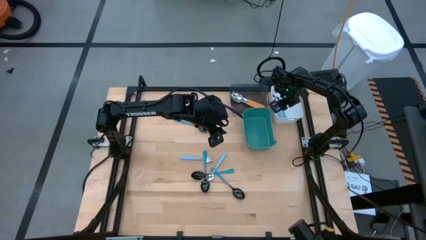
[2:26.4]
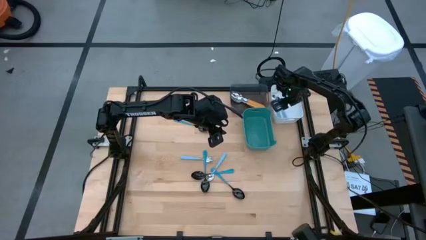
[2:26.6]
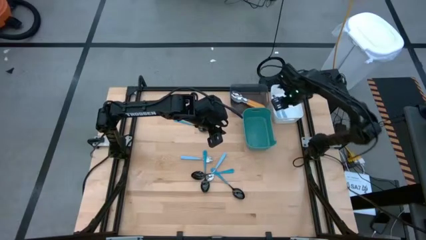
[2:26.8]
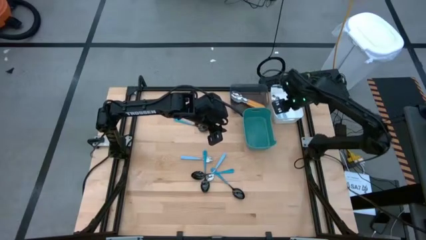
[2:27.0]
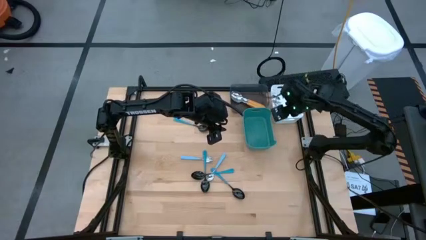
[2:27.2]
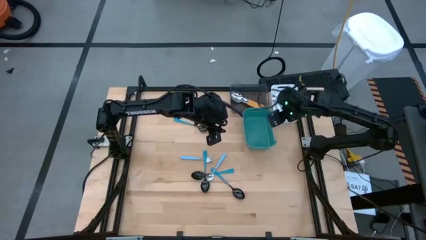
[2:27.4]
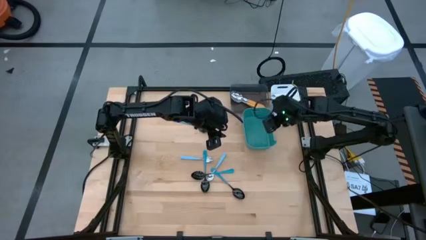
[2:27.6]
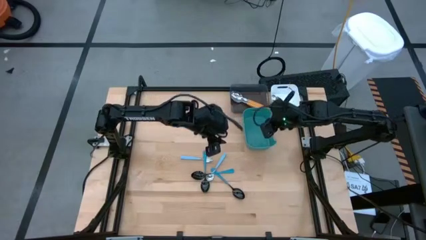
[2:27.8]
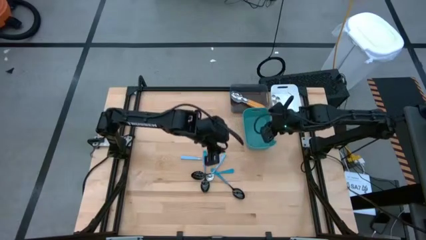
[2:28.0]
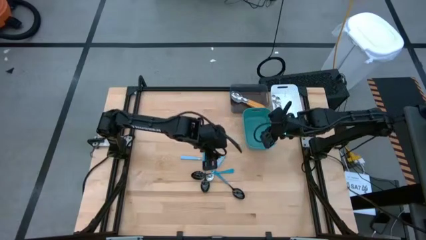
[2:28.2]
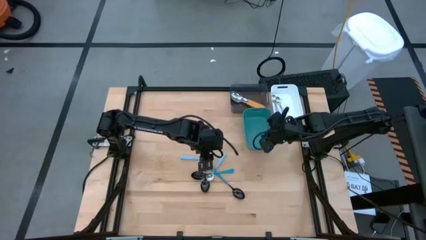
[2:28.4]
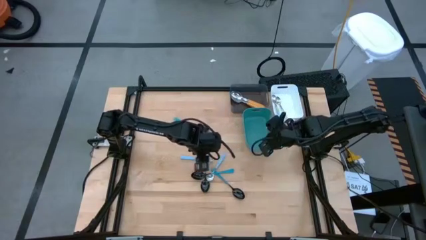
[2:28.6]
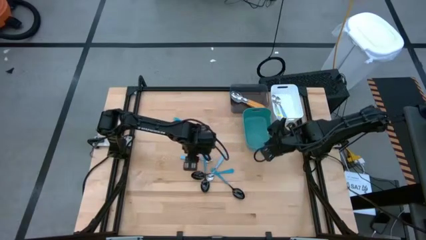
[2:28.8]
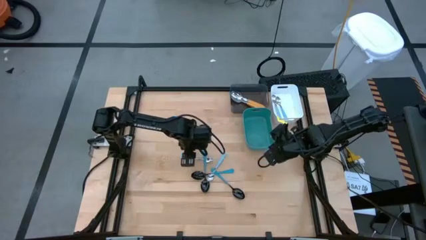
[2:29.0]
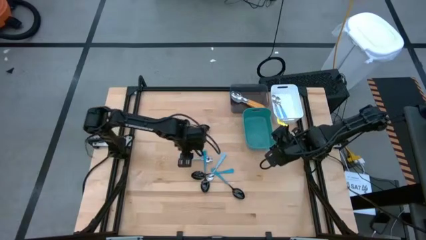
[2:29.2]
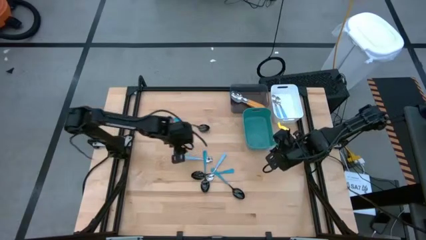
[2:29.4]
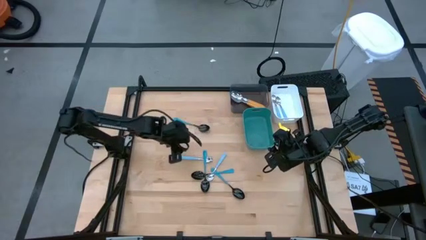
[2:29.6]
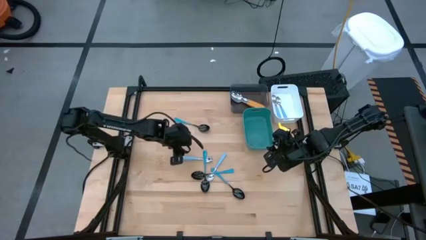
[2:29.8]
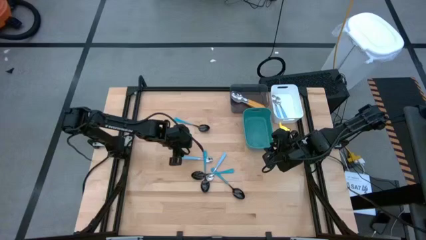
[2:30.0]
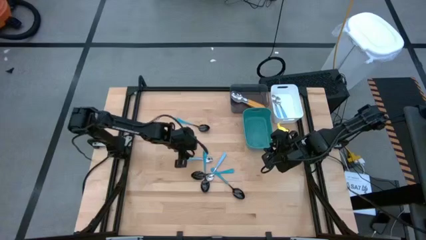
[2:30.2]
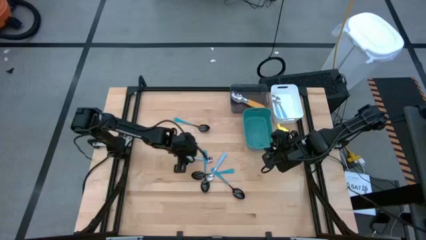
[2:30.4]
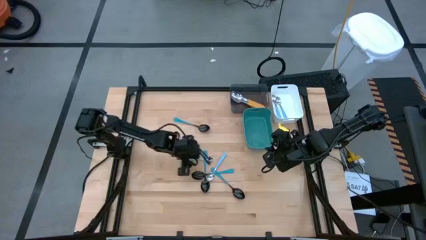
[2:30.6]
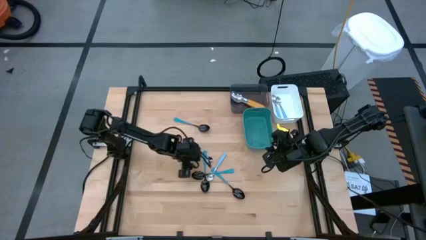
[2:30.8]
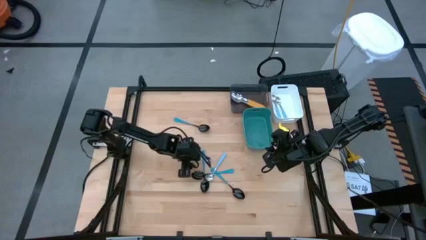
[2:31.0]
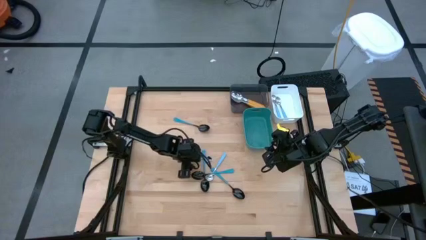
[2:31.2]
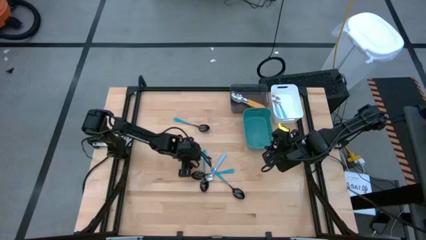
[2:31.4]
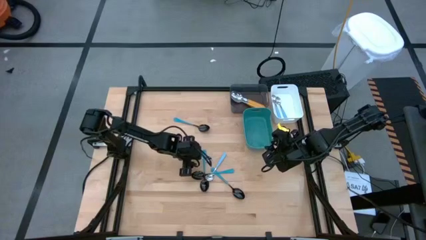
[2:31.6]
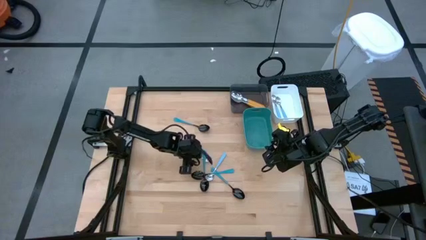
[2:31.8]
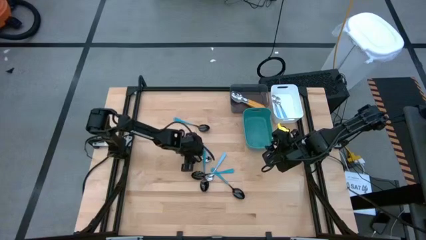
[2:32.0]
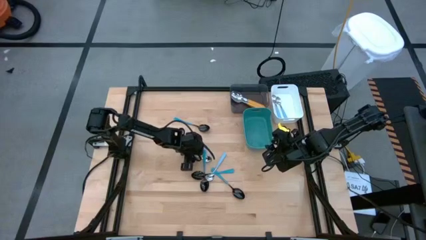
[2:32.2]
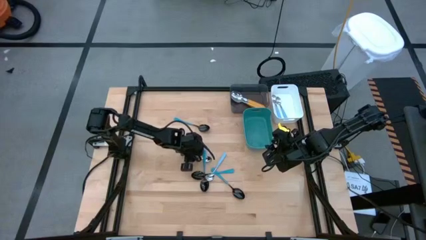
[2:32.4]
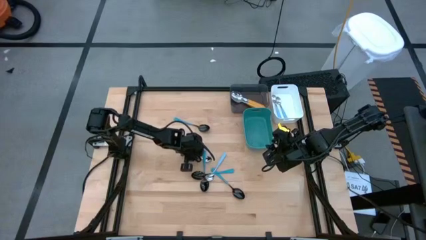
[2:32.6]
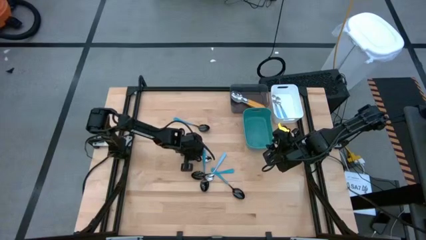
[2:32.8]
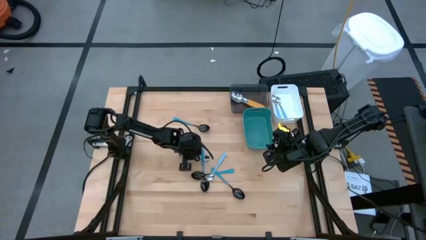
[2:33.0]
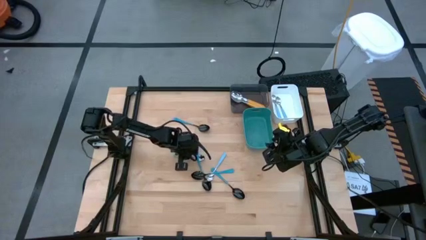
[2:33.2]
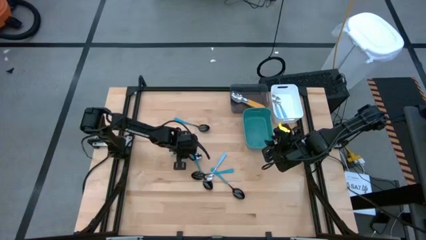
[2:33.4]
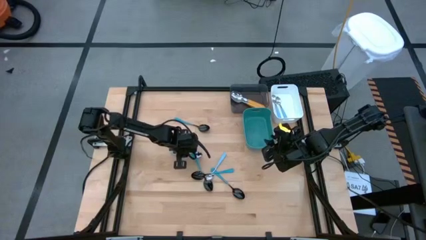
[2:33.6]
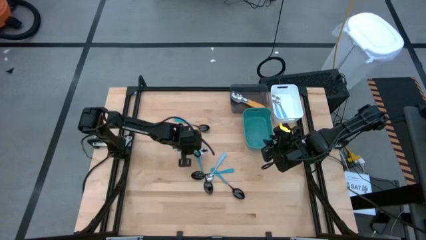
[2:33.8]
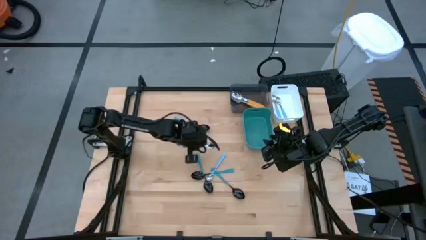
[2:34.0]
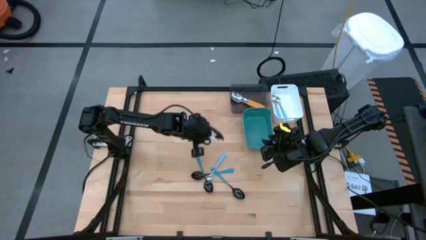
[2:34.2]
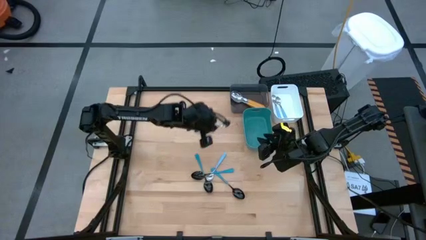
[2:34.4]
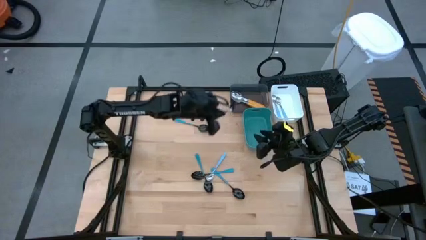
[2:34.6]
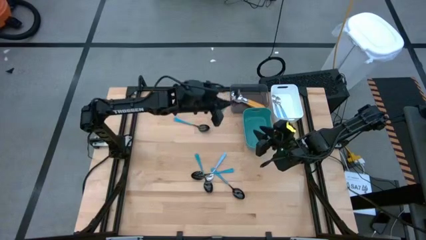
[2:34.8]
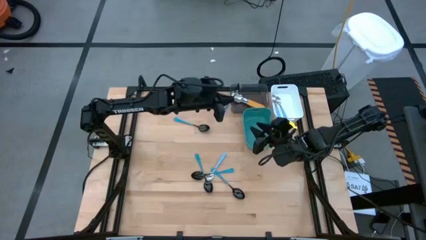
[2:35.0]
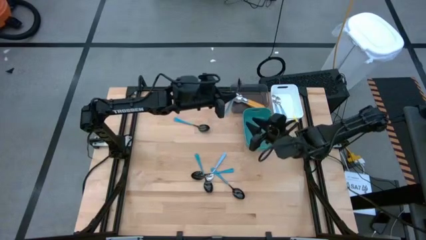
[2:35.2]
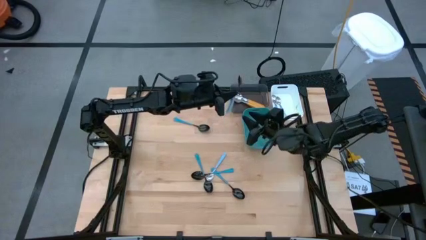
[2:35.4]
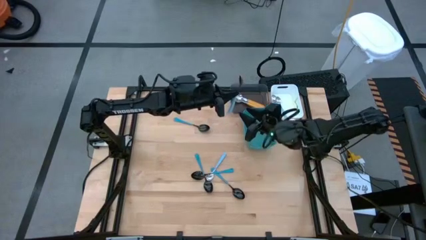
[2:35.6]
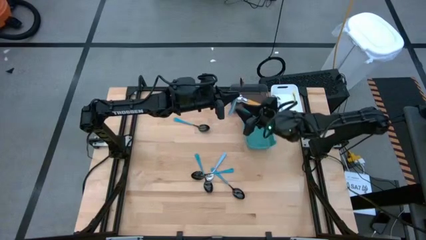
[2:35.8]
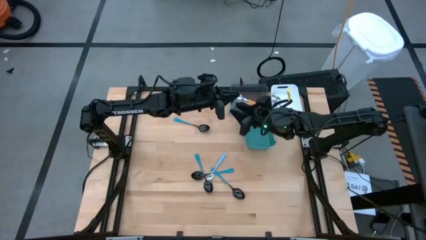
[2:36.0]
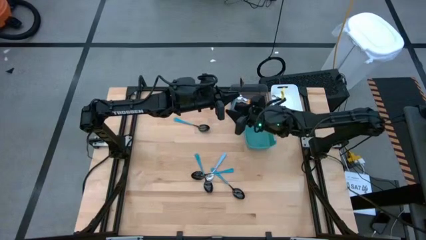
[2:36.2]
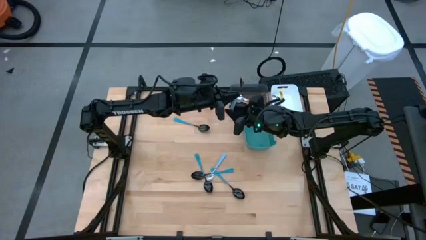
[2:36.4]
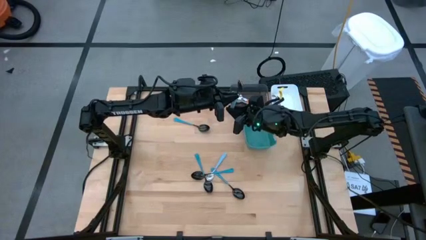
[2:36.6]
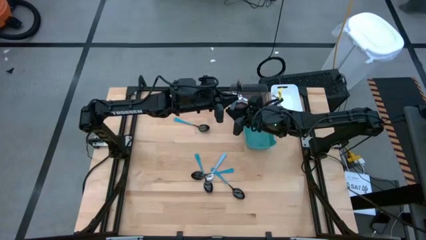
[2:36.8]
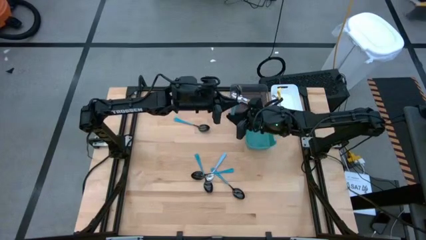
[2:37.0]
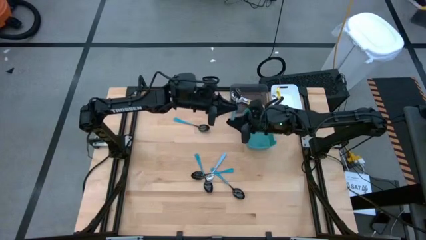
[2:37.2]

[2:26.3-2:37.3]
Task: Sort silverware by color (type)
Put the light blue spoon into the white bin

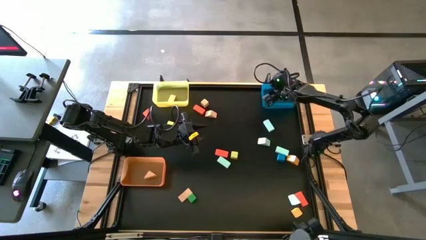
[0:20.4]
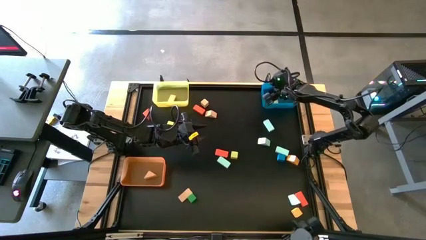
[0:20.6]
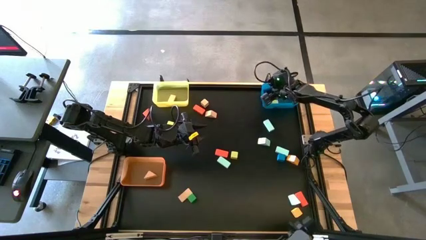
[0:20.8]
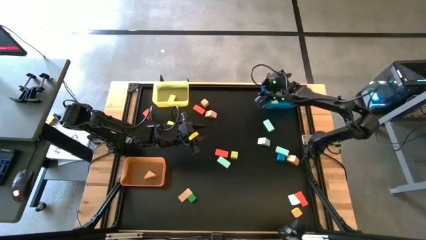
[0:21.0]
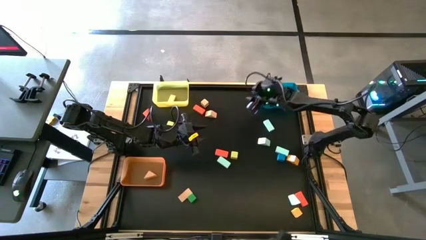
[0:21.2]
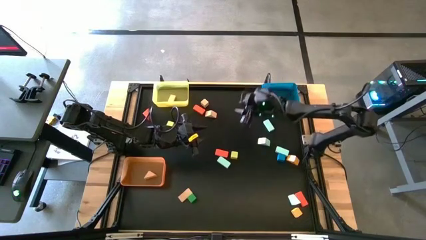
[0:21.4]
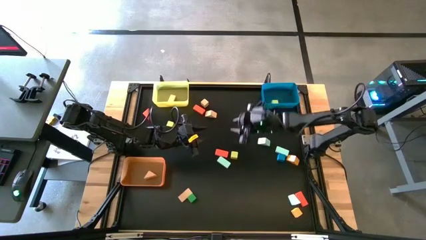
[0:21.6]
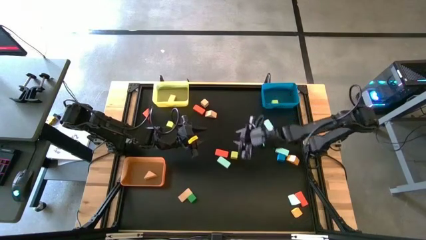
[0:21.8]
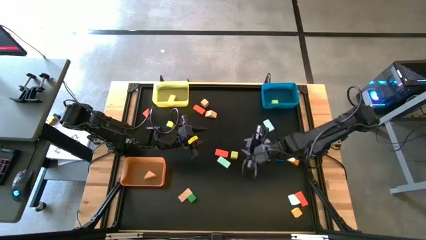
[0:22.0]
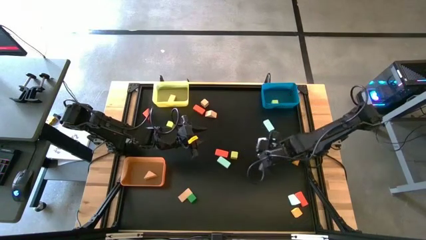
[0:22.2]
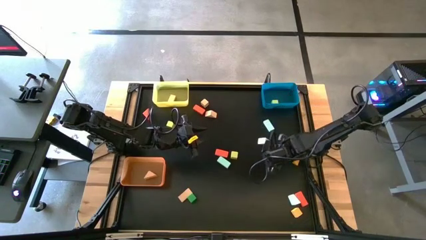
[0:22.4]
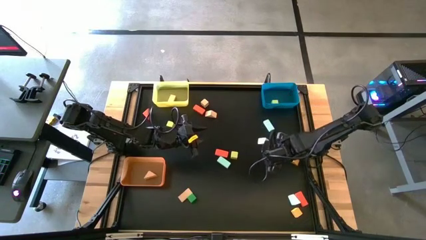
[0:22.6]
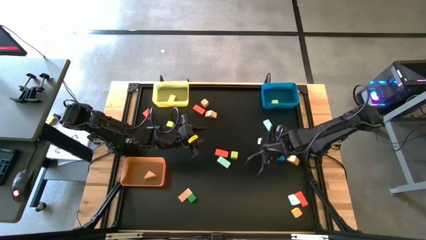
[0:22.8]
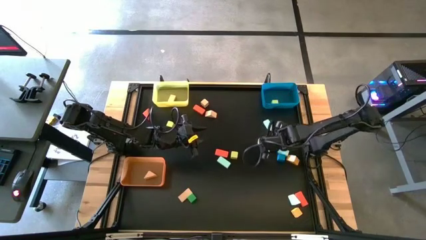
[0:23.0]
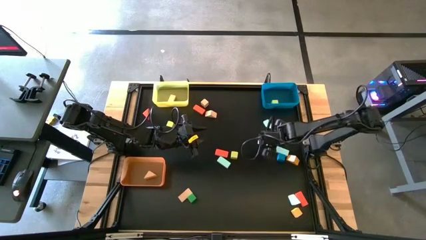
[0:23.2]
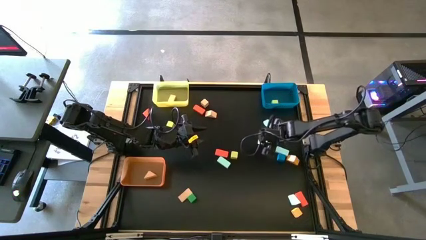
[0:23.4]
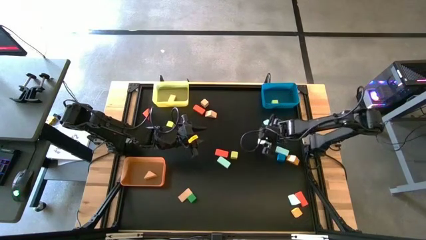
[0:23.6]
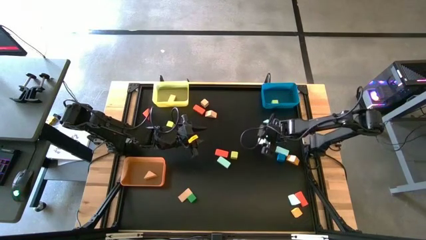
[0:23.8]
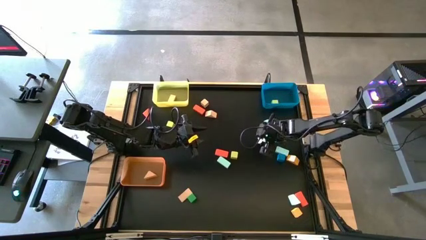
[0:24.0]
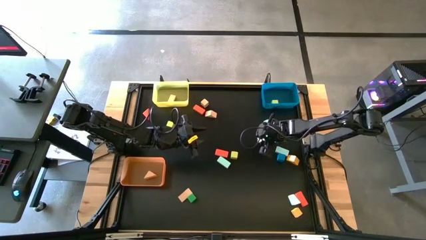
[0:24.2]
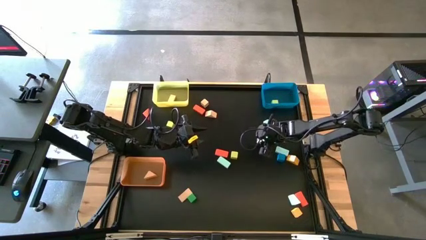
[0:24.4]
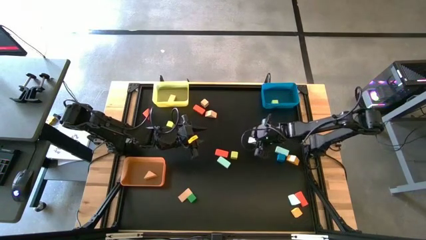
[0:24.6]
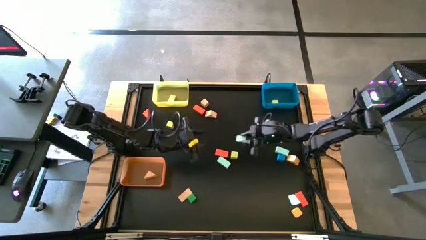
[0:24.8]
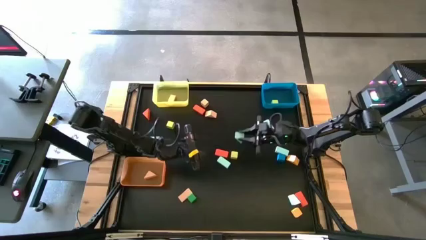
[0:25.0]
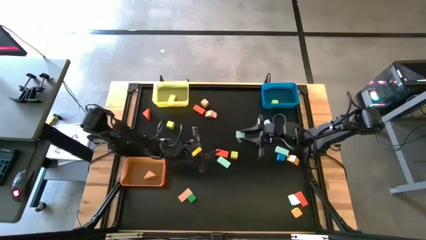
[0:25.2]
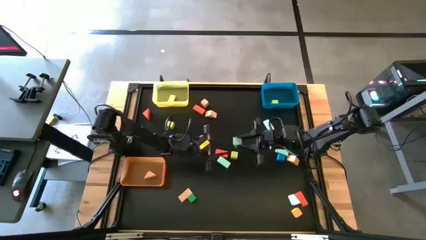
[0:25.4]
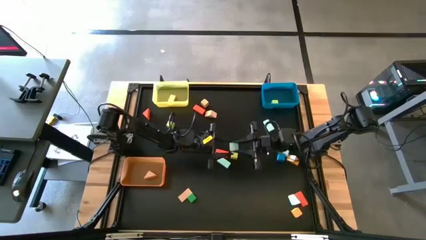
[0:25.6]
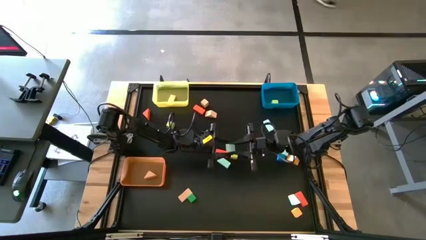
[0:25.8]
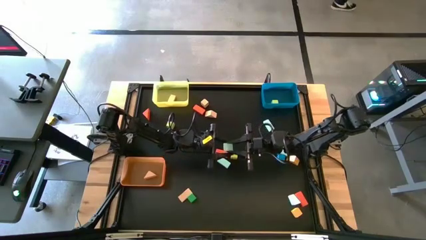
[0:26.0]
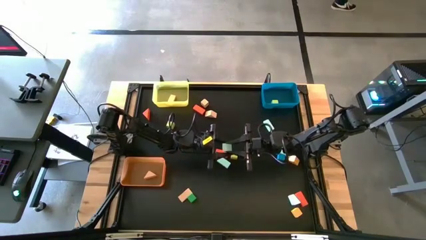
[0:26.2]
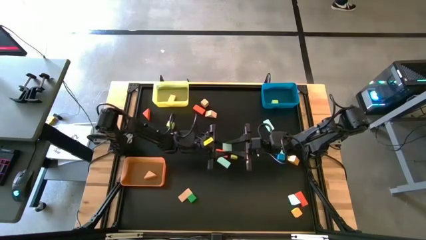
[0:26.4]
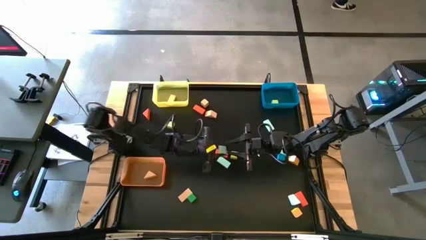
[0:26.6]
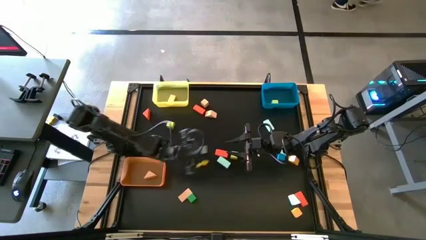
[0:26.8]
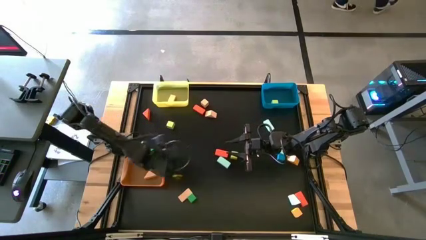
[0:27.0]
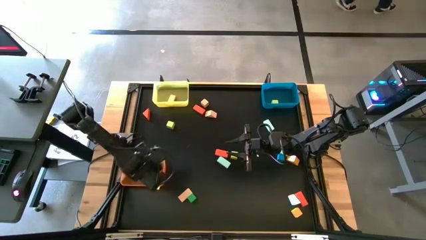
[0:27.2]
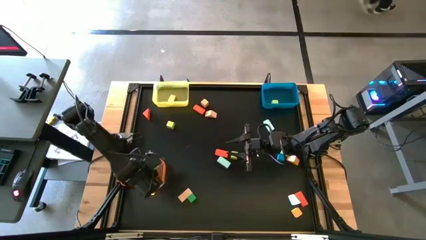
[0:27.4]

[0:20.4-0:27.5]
Task: Sort blocks by size
Put the light blue wooden block into the orange bin
